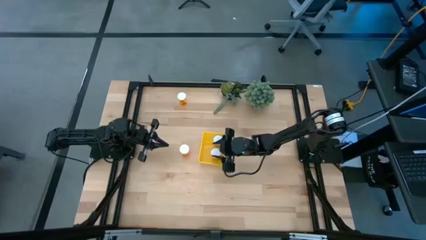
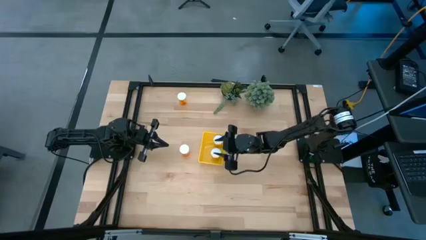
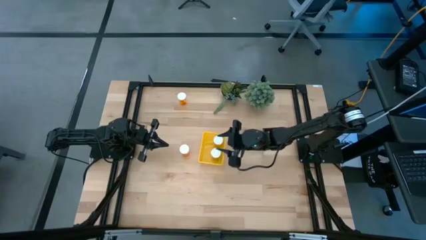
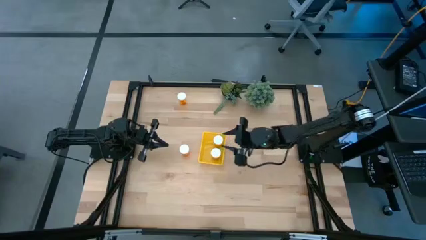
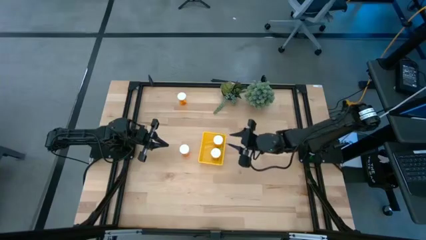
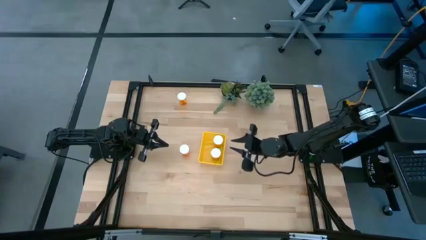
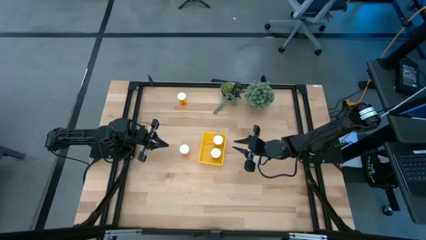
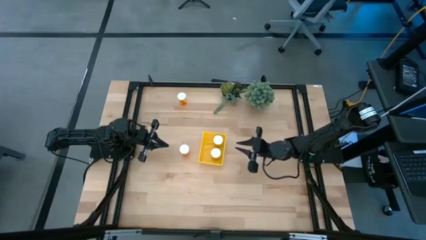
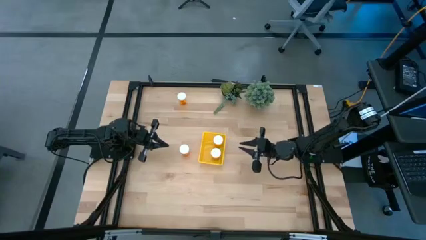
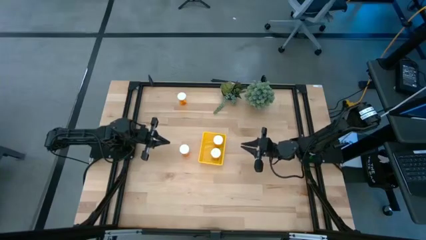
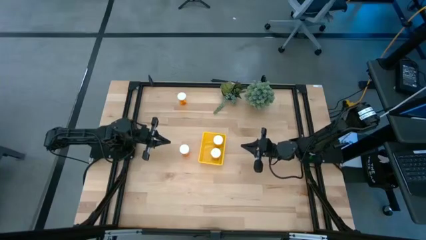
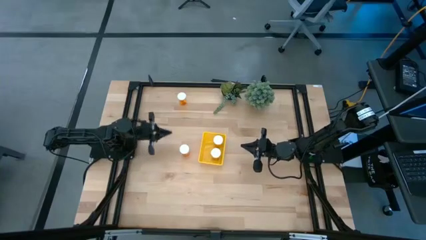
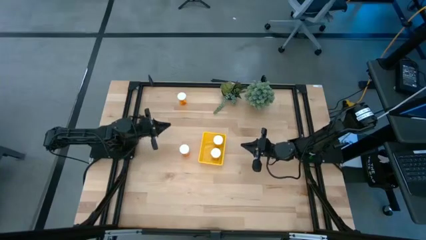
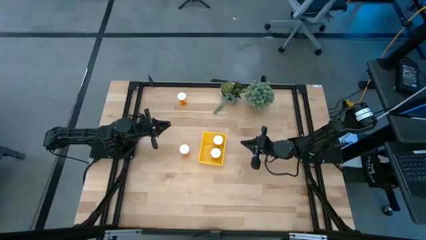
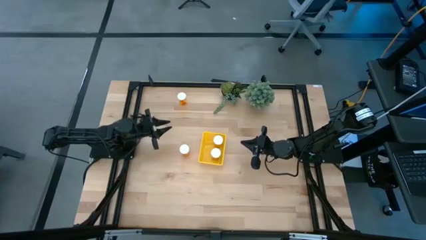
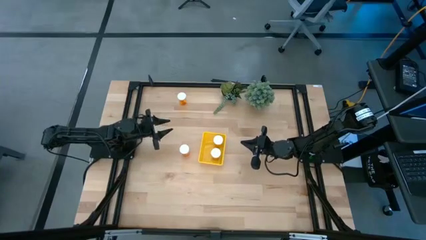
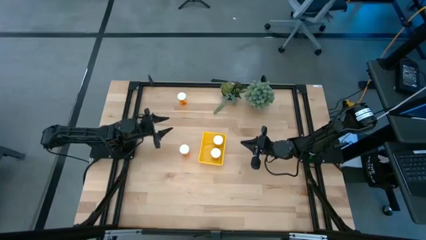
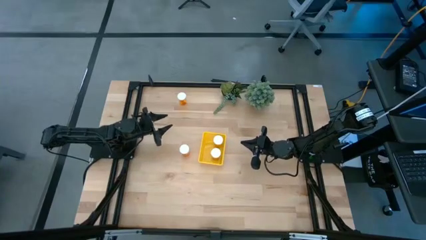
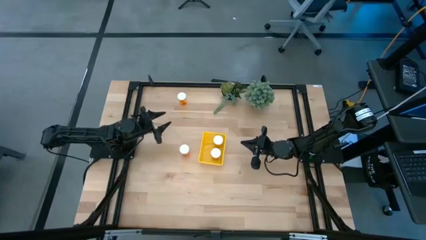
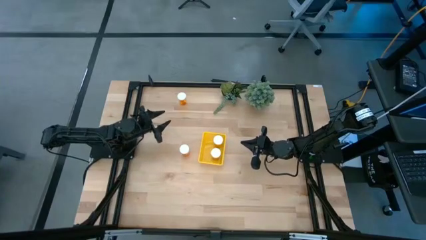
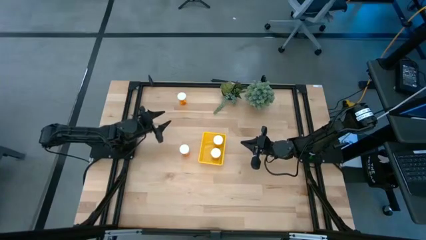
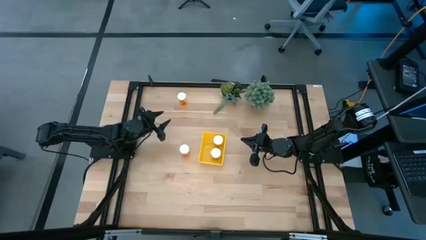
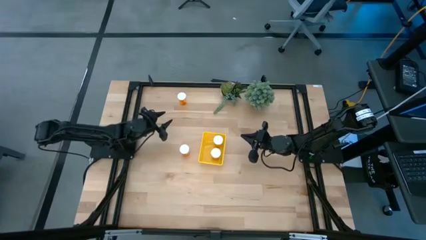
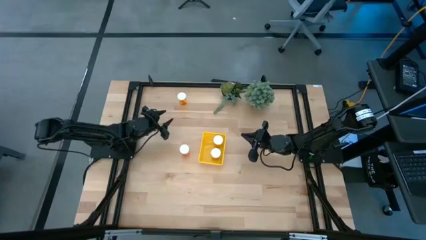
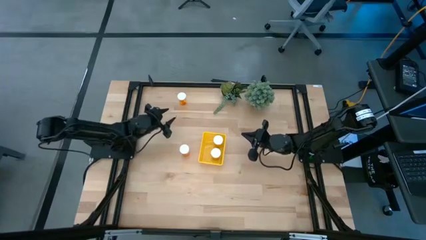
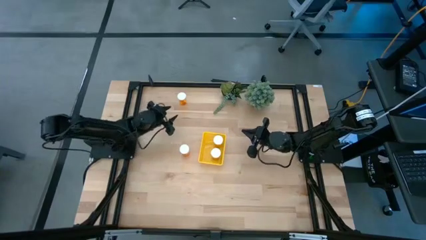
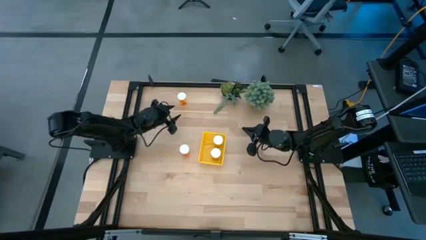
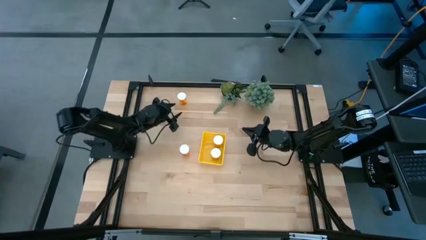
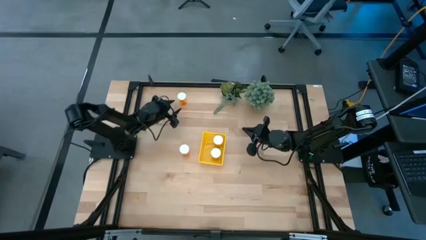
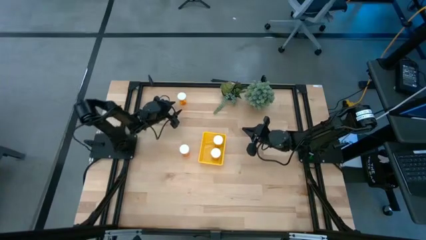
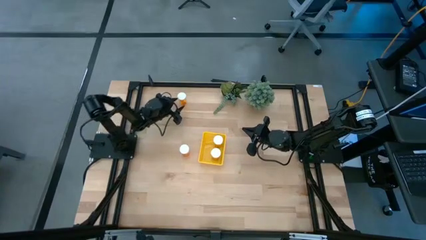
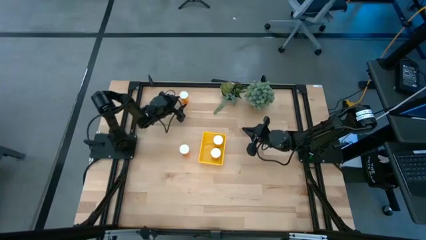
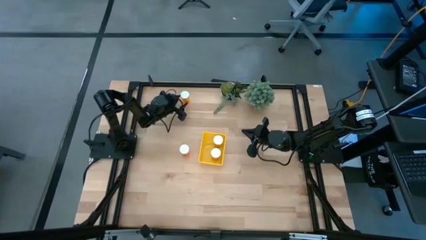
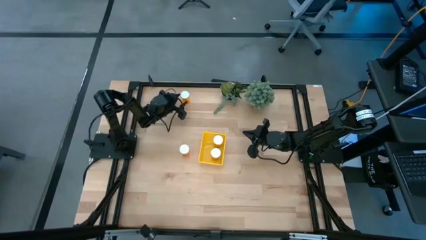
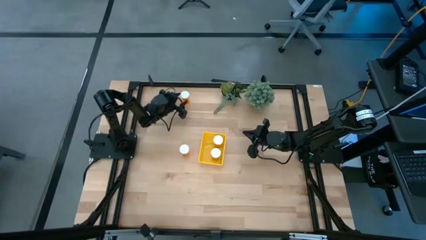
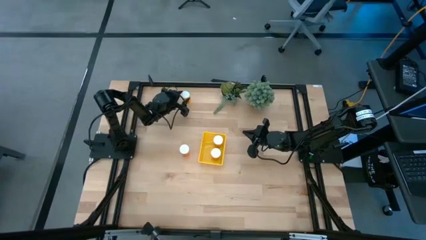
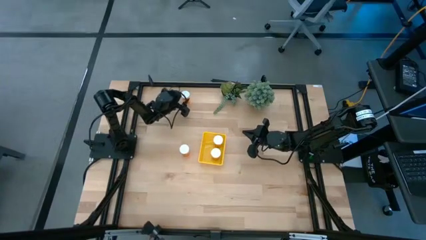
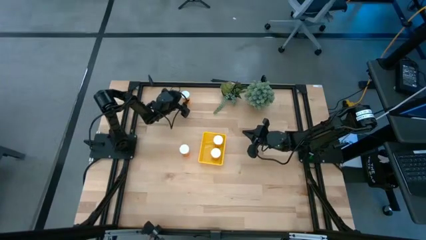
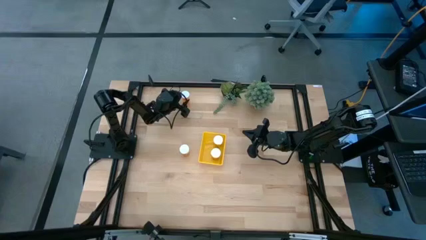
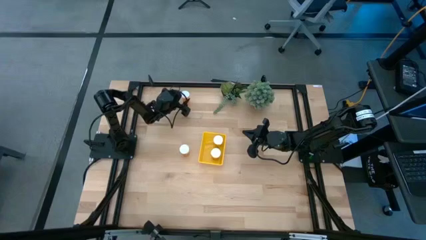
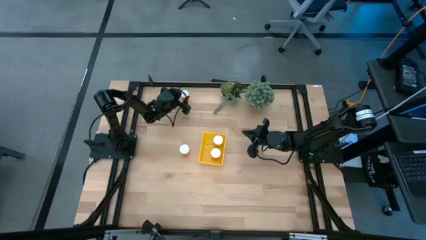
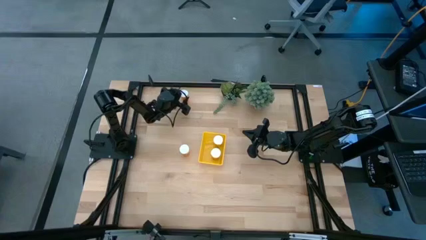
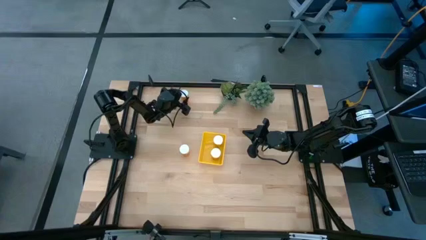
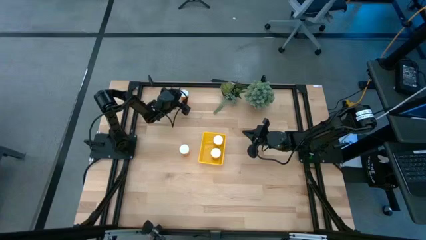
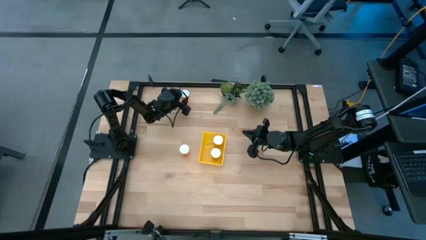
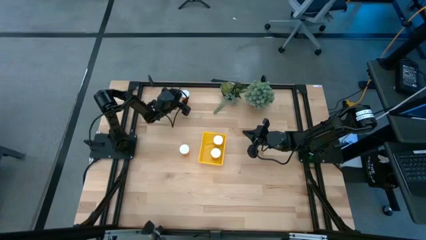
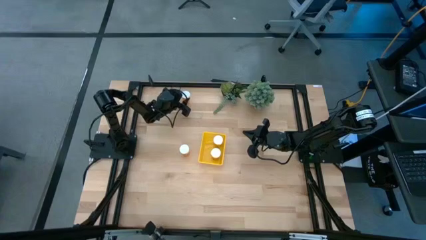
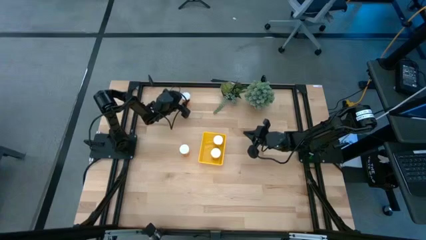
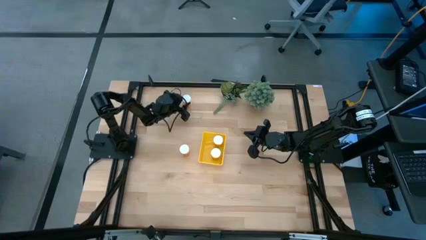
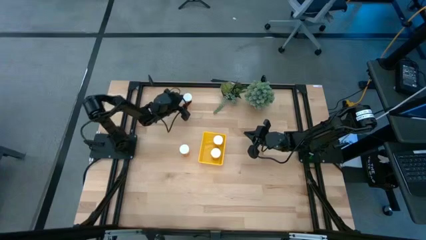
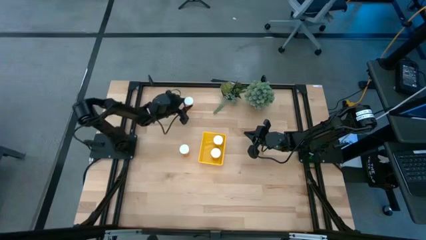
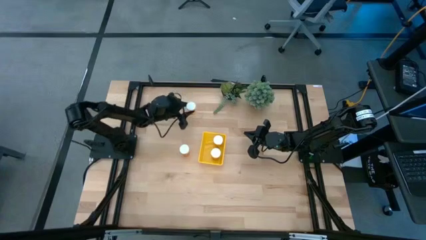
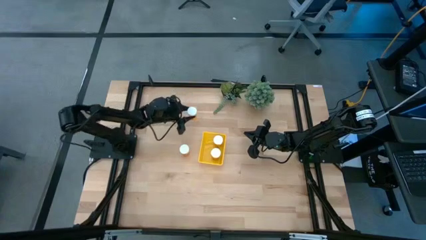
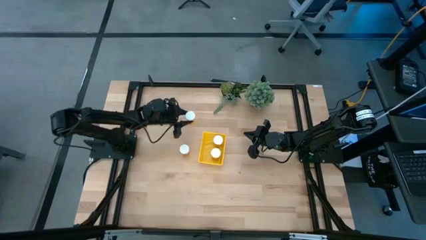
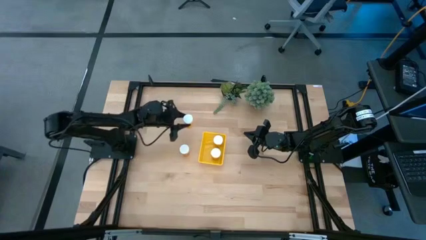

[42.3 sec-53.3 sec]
Task: Pick and place pill bottles into a basket
Put the orange pill bottle into the yellow bin

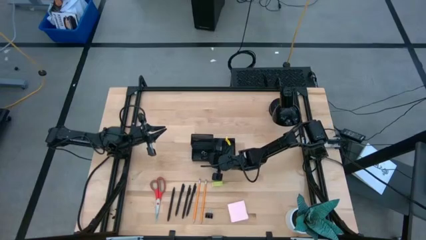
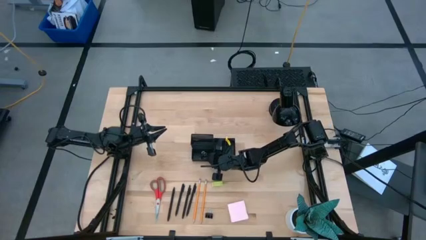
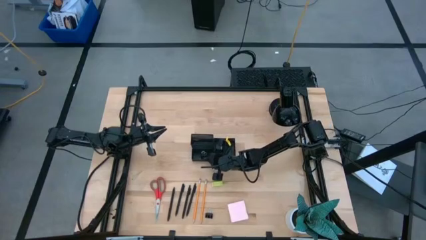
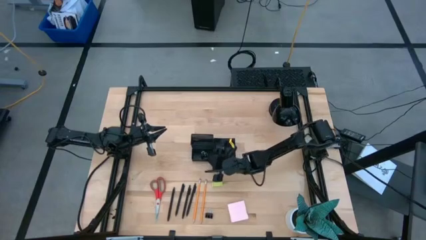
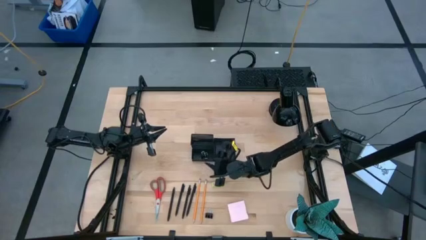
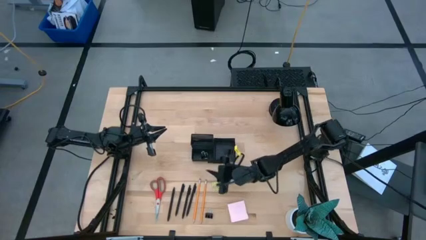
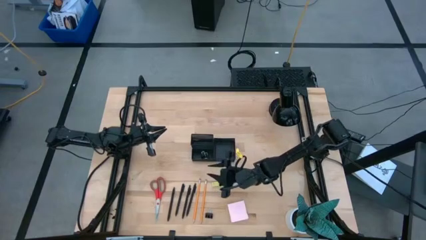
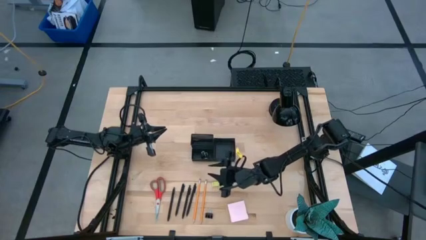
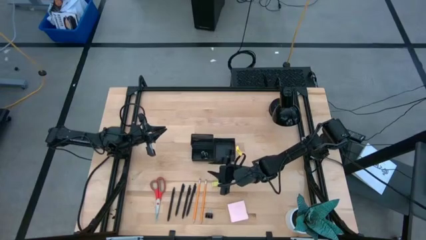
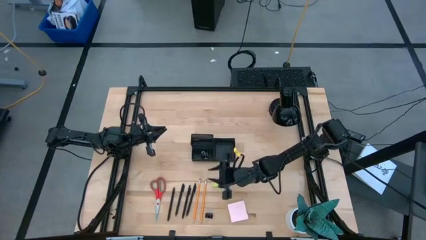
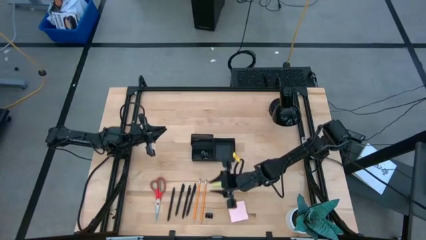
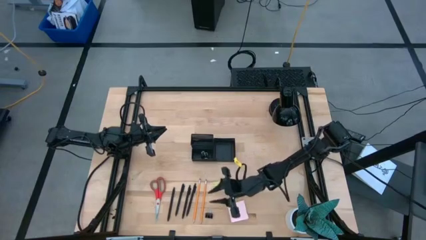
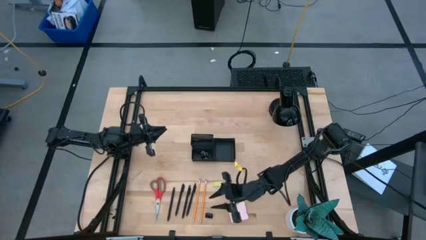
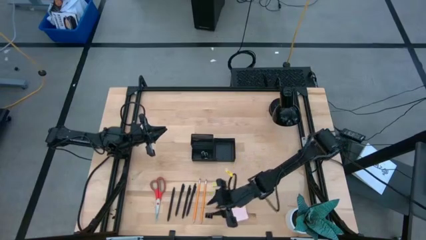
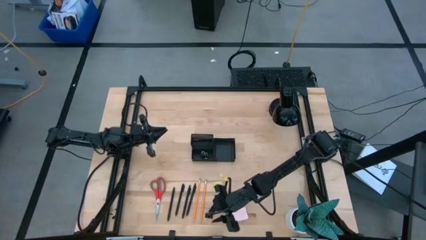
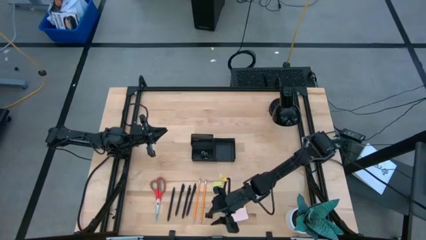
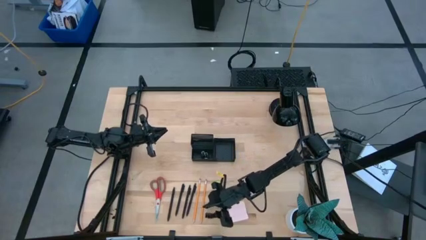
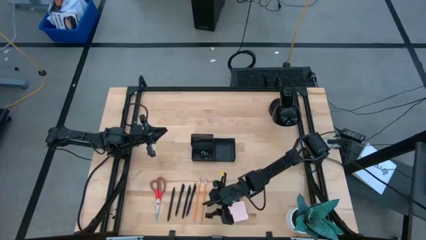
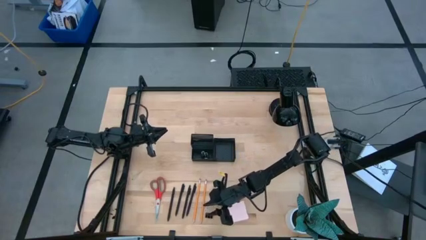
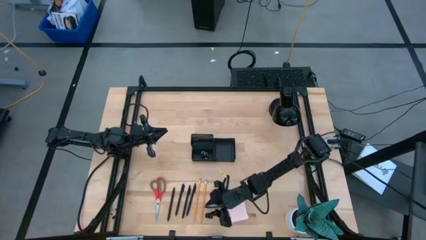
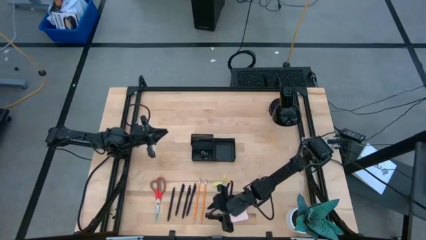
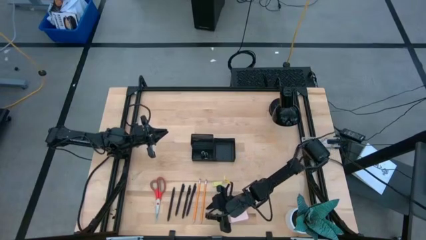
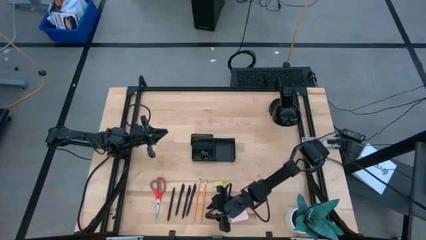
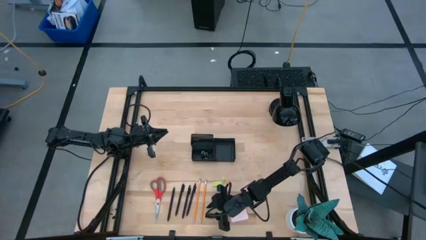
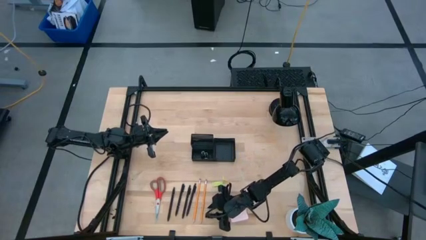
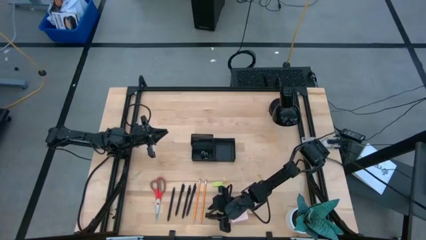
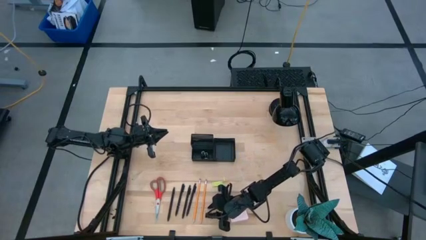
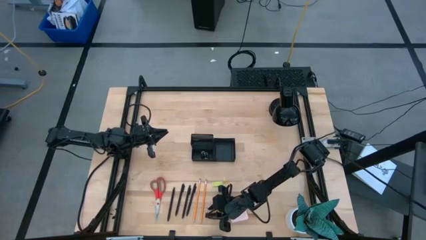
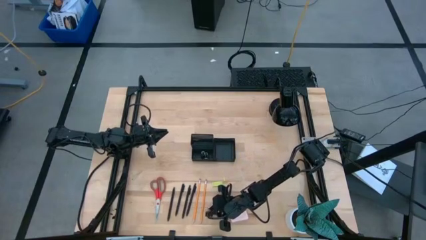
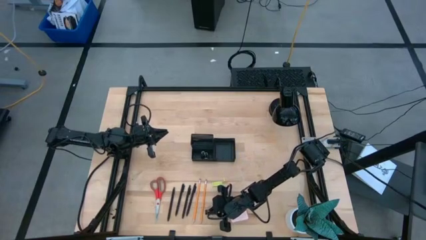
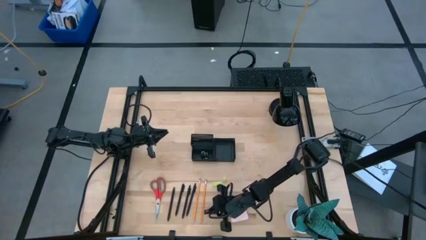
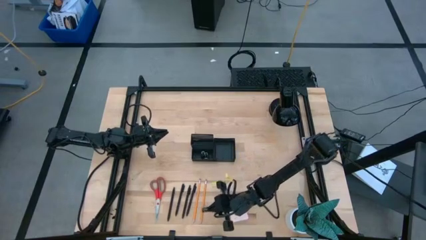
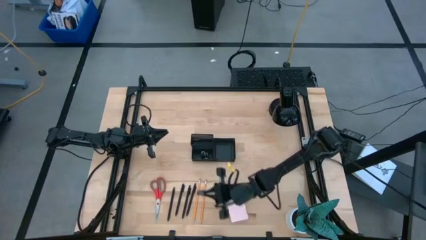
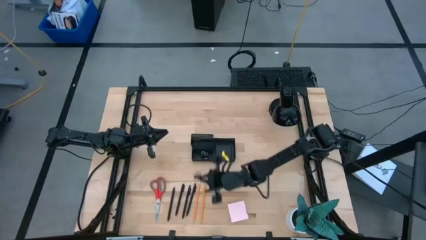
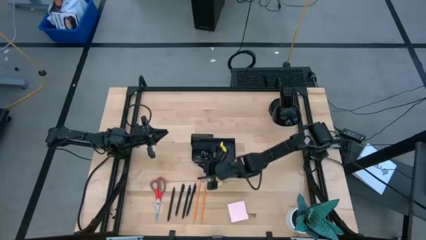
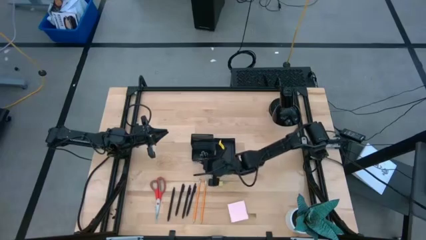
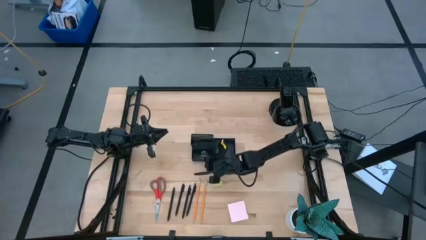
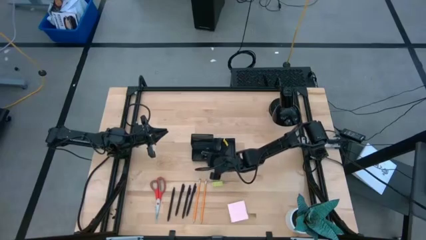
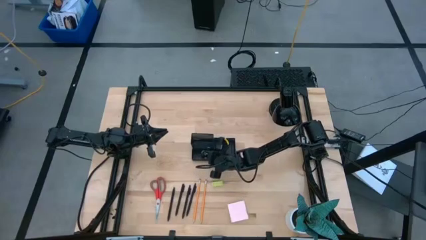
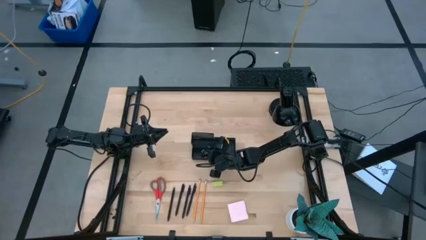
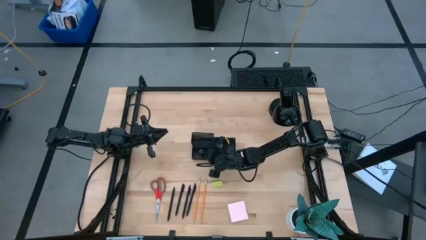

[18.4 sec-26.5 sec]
Task: Pick and place office supplies into organizer
Put the black binder clip into the black desk organizer
